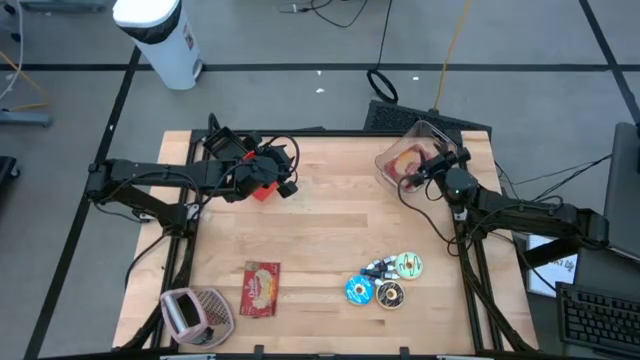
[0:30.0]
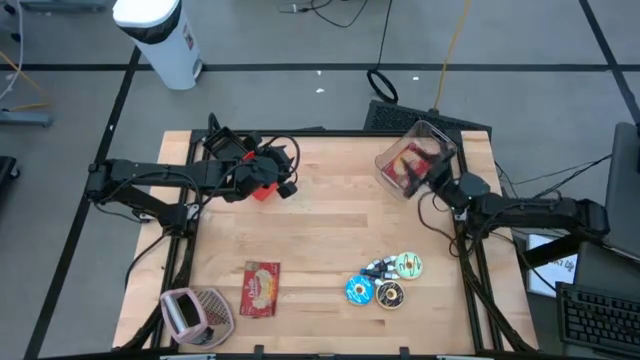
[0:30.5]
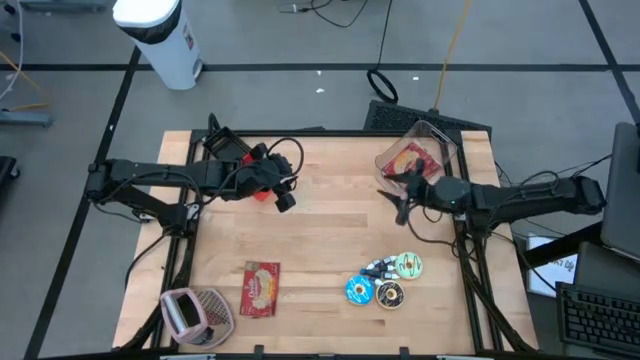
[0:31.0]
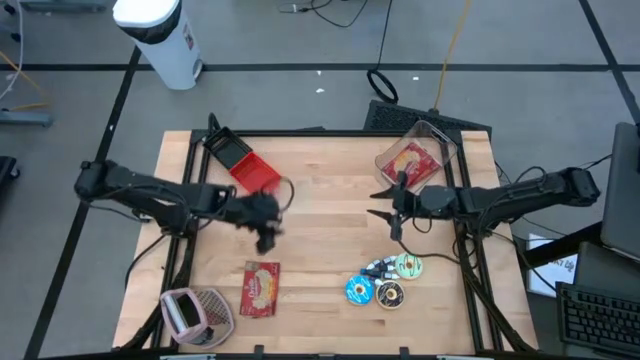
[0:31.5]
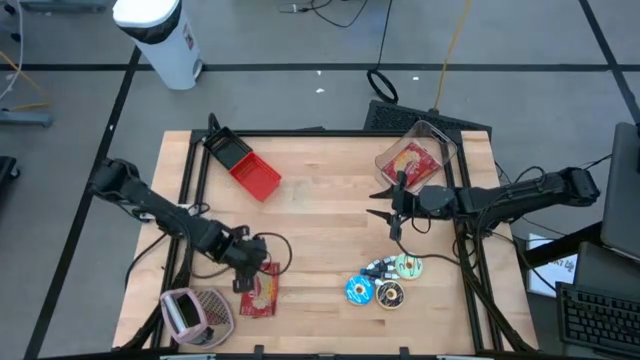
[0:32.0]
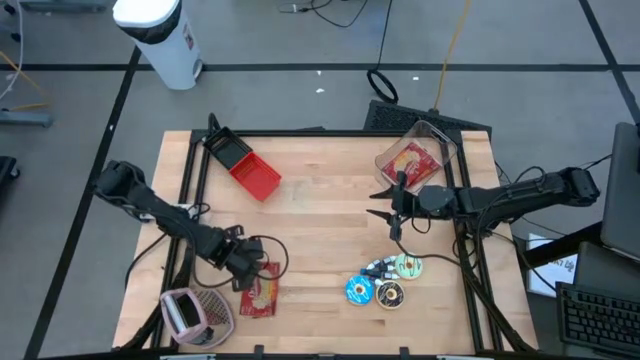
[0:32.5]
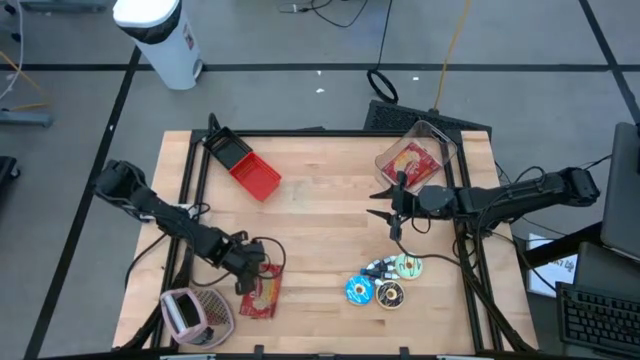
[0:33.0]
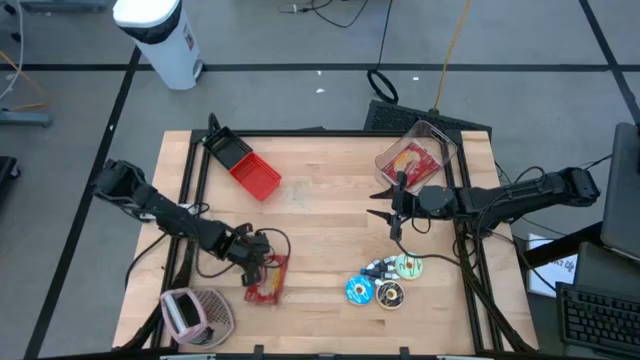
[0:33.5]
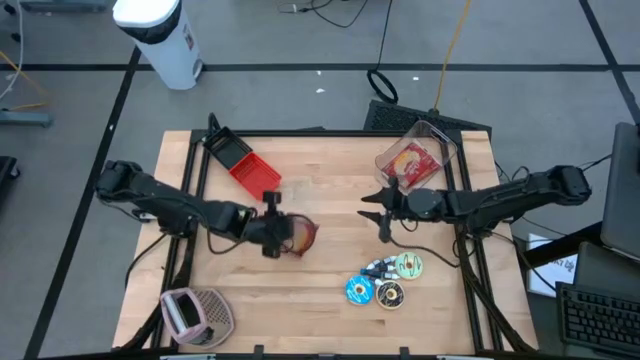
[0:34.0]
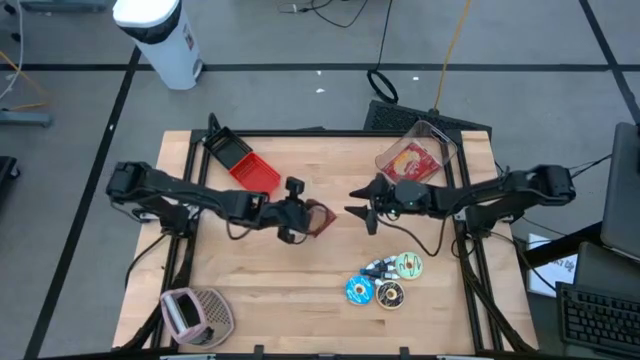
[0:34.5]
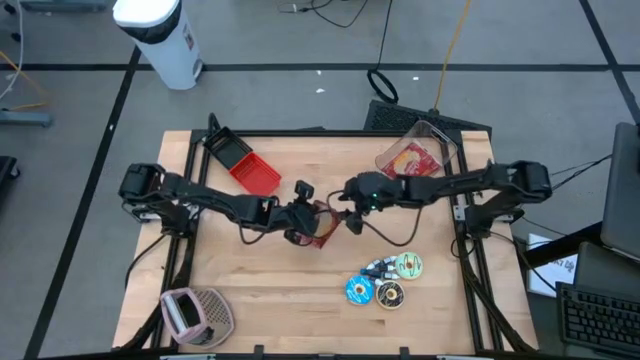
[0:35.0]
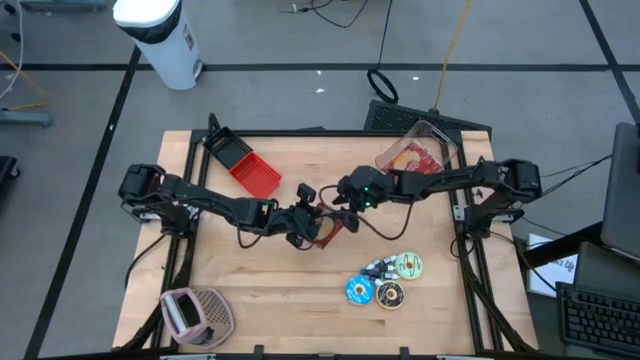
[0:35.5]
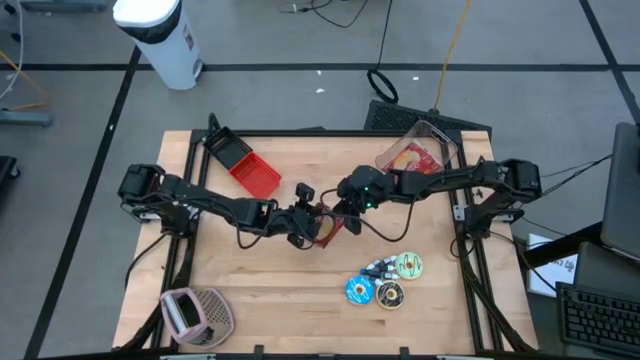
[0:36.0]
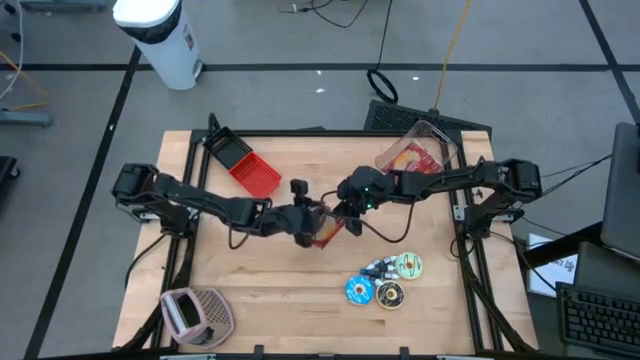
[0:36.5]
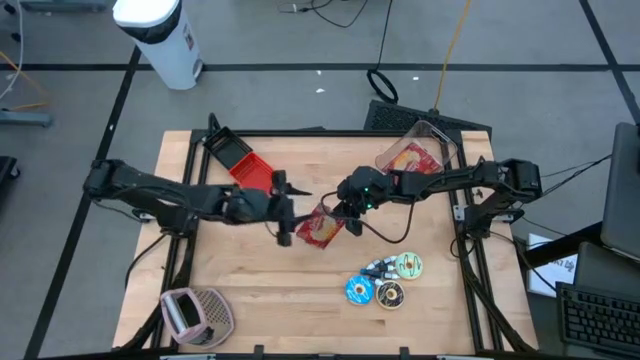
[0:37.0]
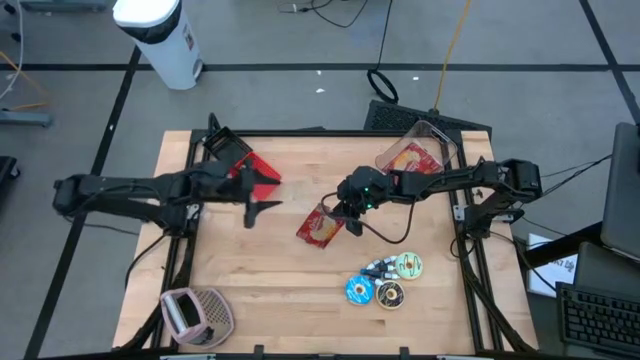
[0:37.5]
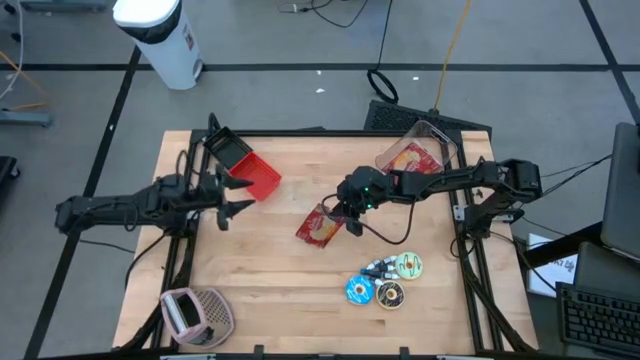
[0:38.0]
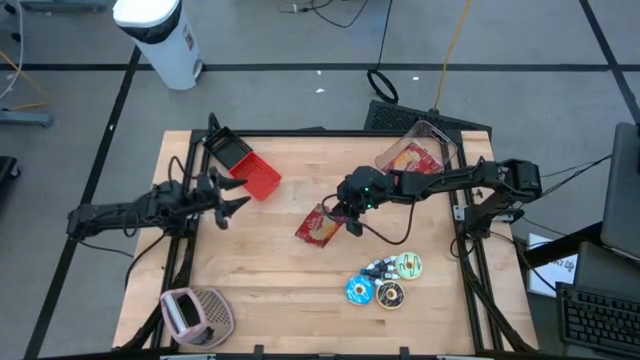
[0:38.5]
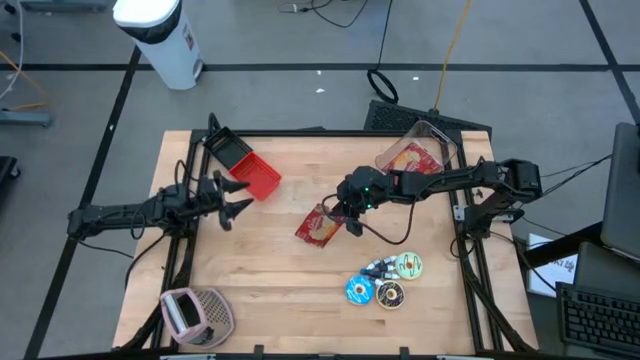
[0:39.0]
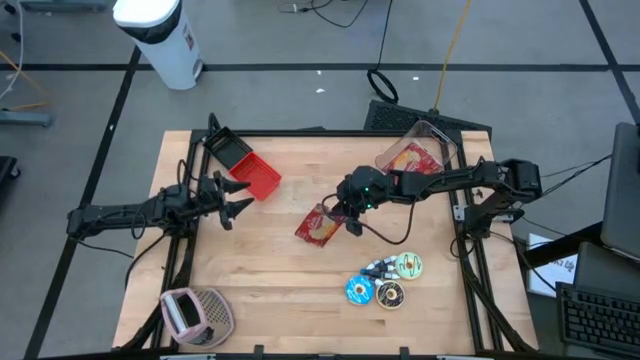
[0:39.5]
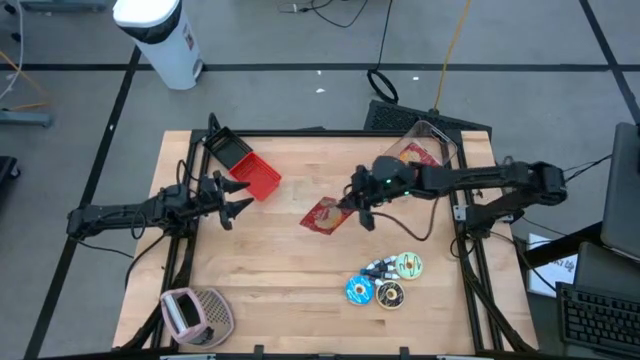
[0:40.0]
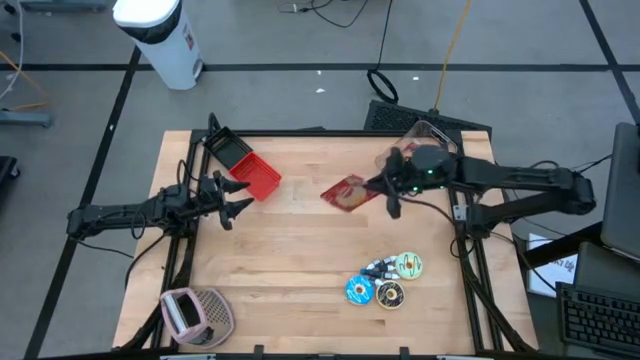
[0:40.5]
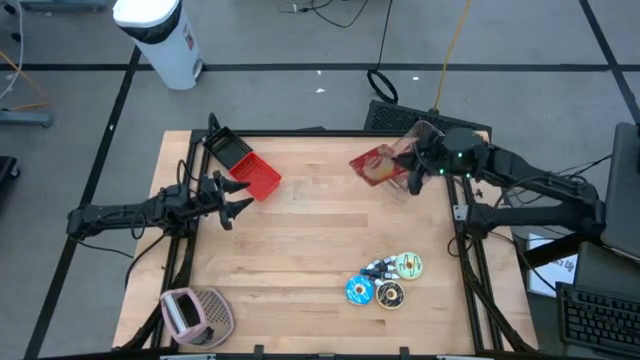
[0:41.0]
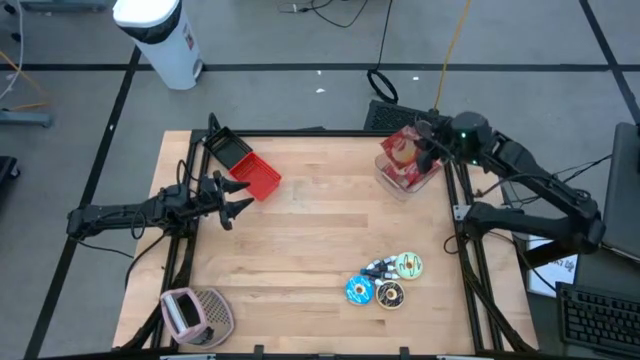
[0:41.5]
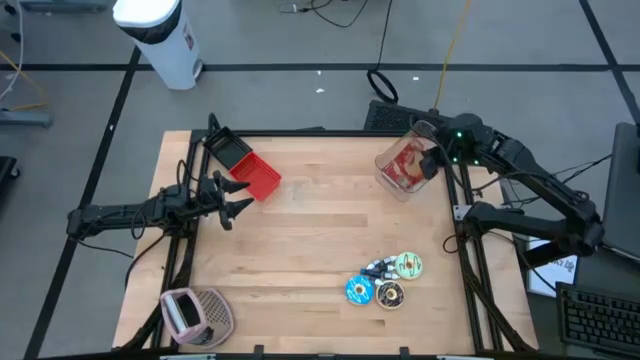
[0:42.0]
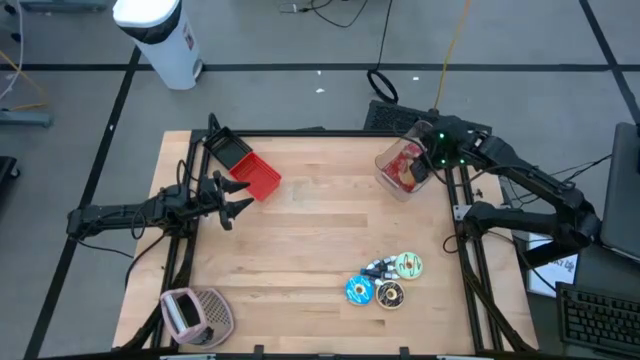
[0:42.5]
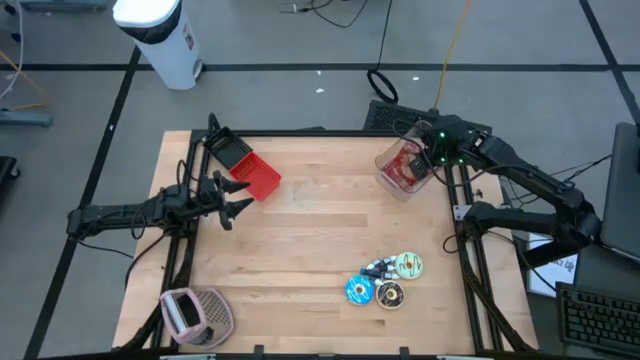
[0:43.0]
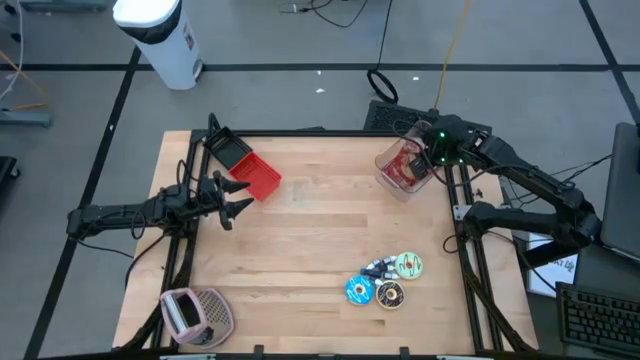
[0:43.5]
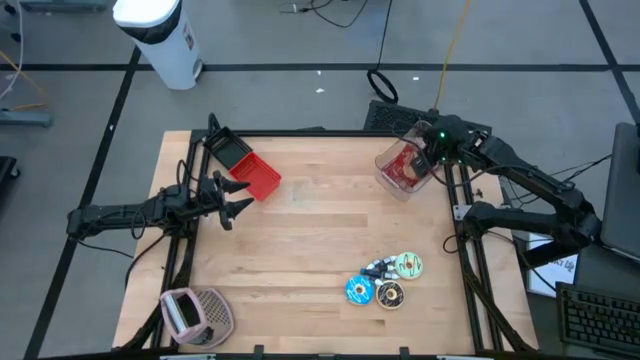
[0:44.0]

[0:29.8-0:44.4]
Put the red popcorn bag into the transparent bin

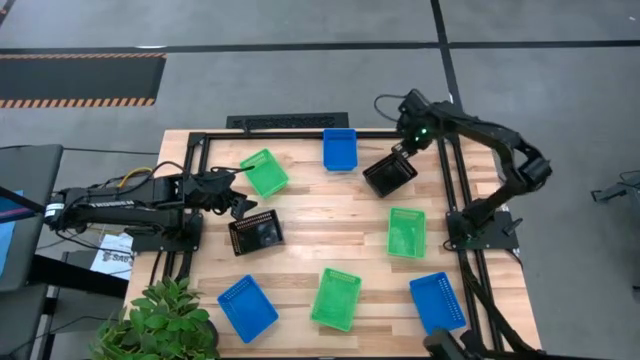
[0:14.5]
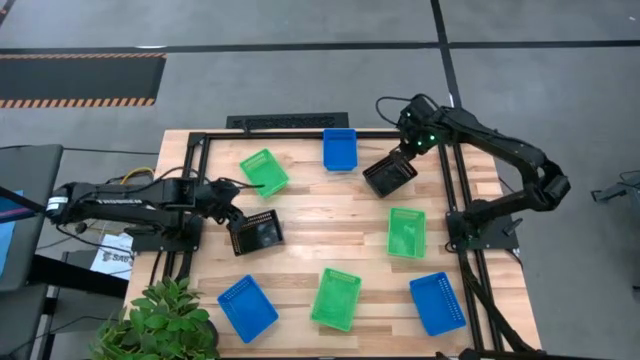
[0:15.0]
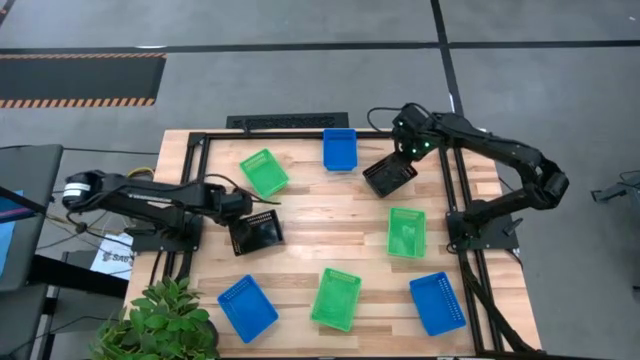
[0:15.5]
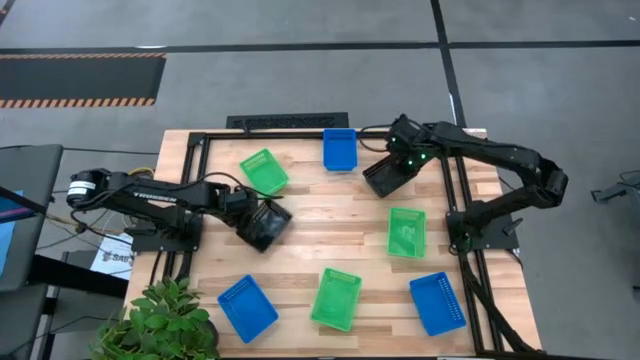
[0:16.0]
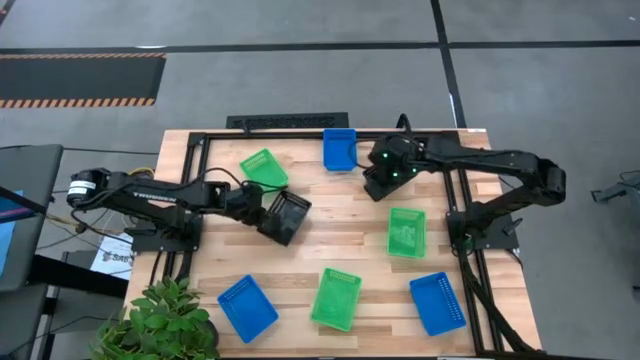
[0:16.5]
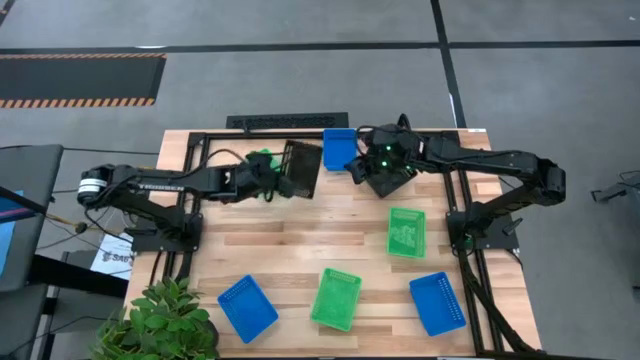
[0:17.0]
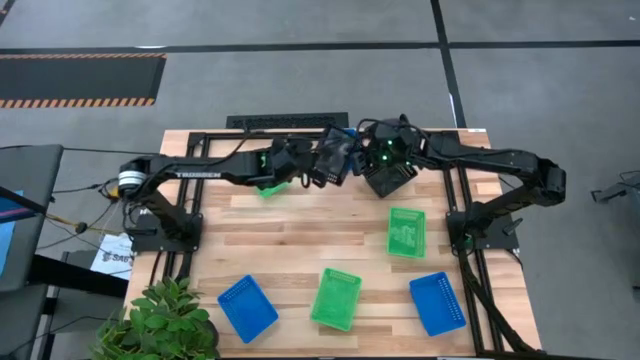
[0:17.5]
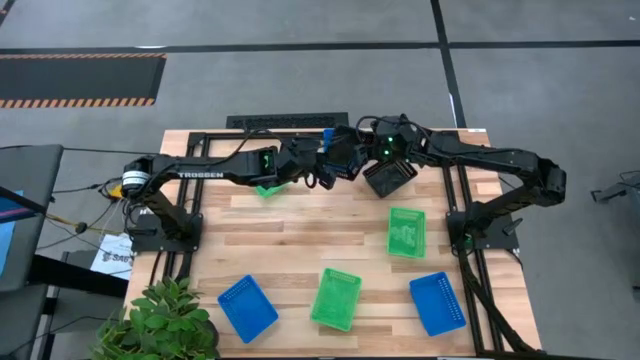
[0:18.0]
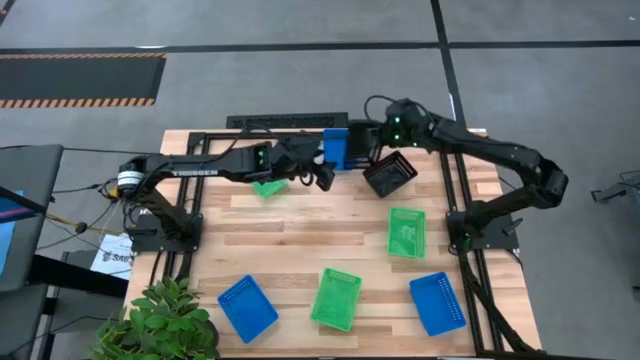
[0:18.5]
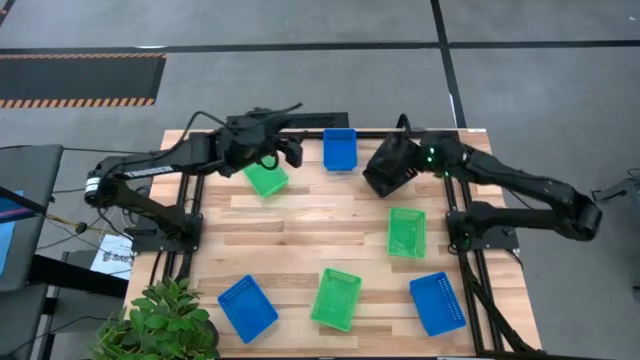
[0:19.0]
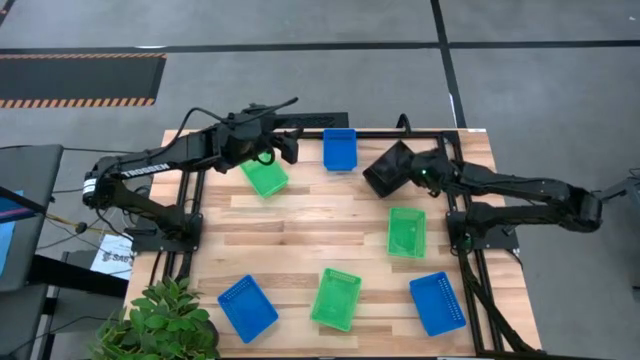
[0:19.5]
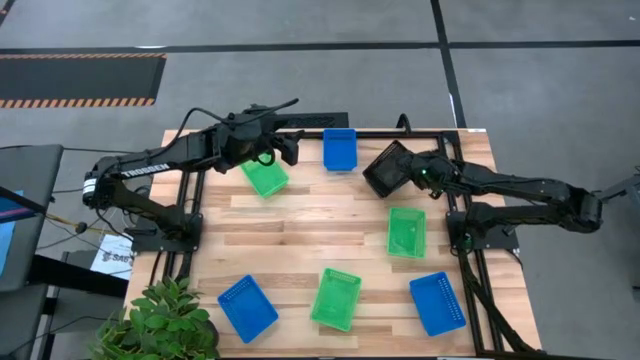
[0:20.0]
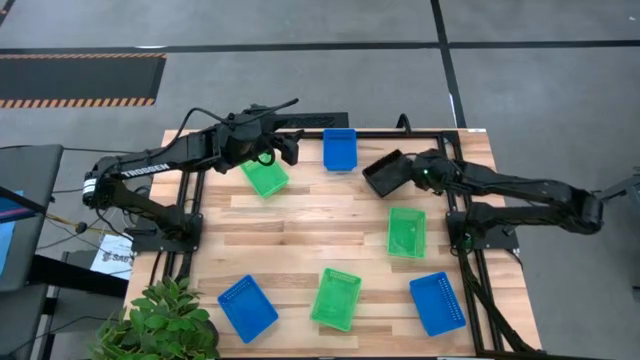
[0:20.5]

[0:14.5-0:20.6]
Stack the left black bin on the right black bins
